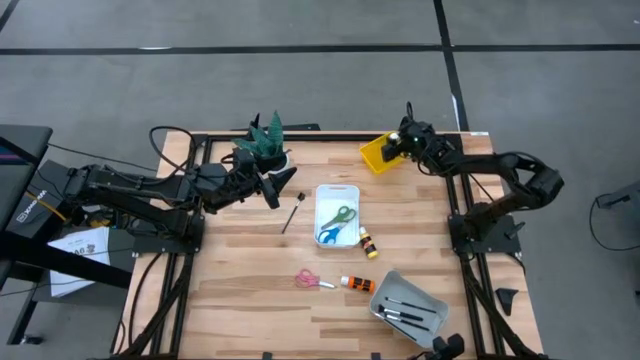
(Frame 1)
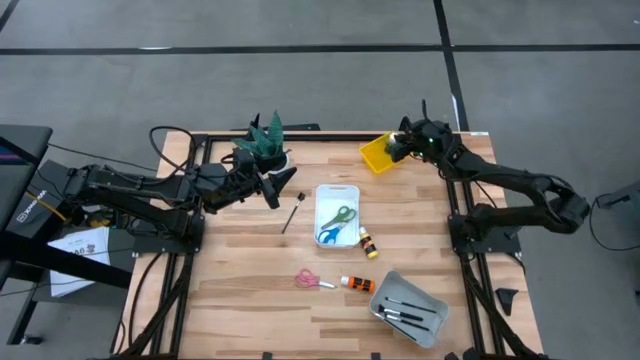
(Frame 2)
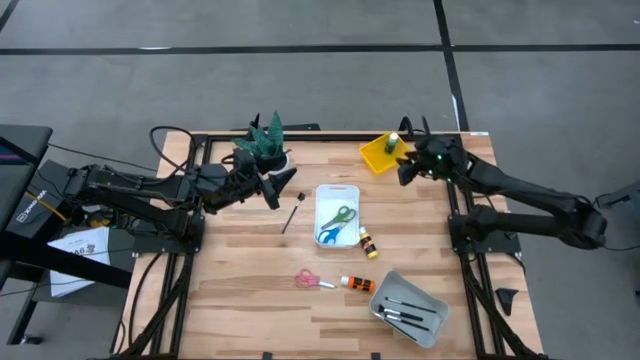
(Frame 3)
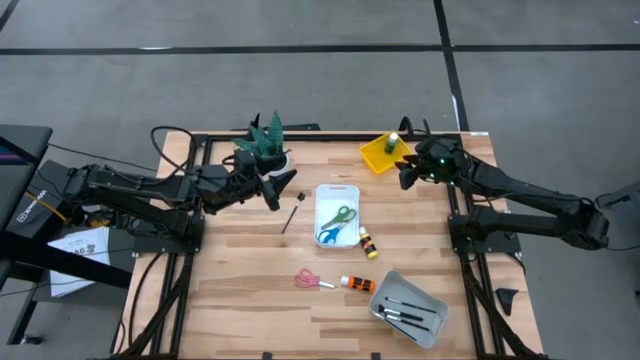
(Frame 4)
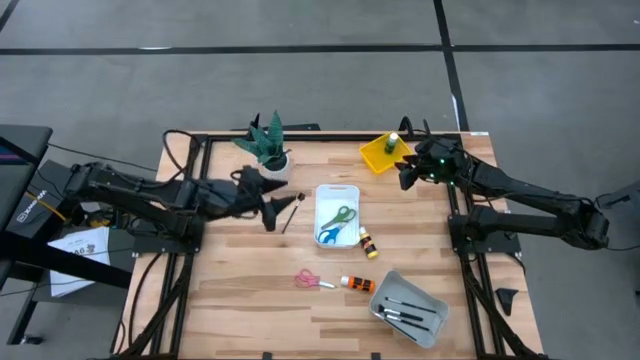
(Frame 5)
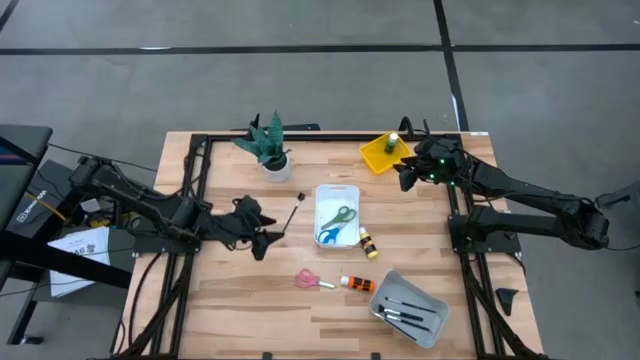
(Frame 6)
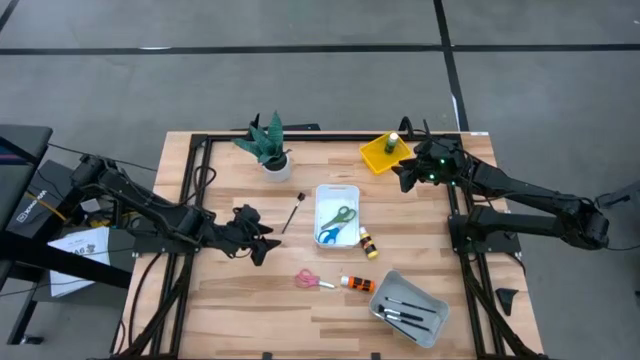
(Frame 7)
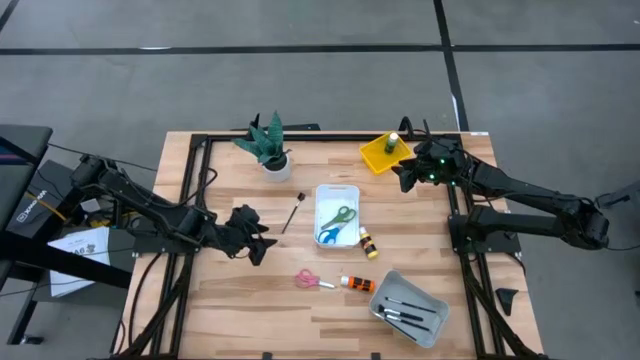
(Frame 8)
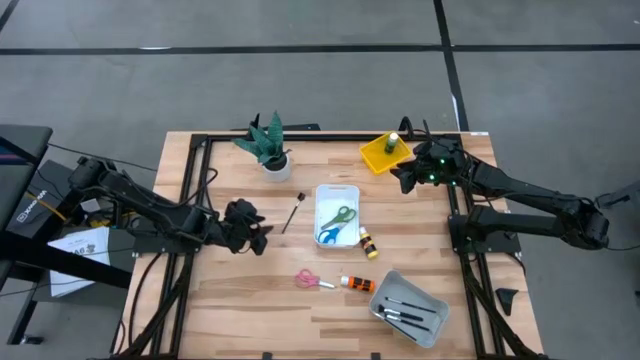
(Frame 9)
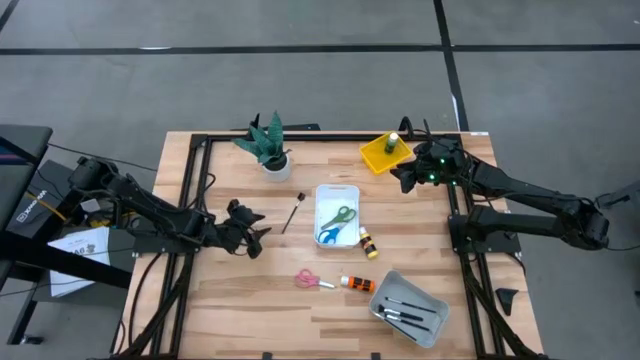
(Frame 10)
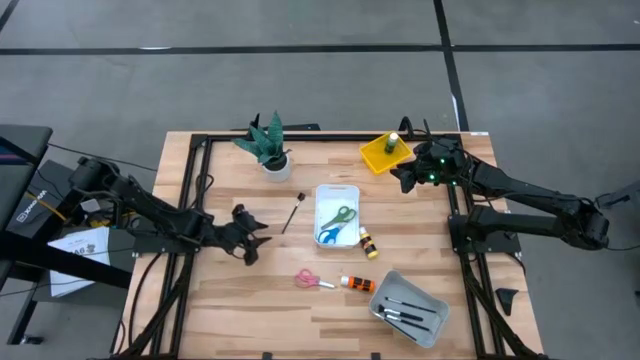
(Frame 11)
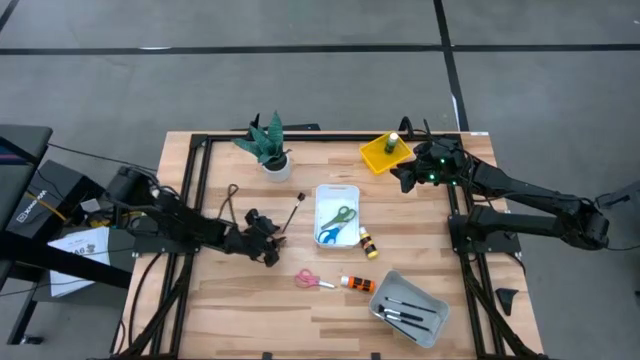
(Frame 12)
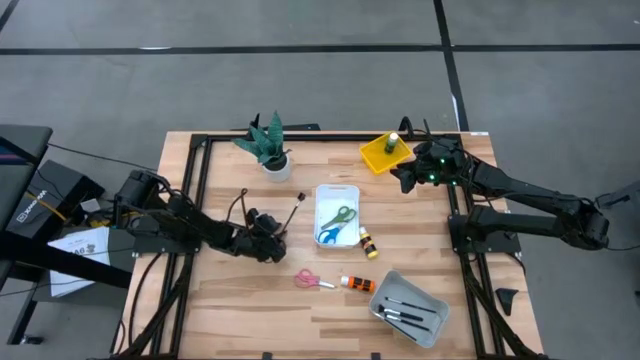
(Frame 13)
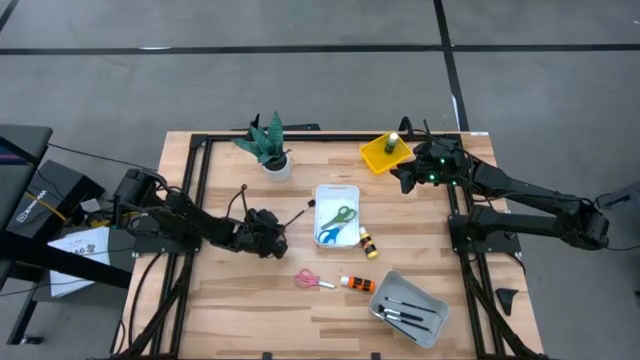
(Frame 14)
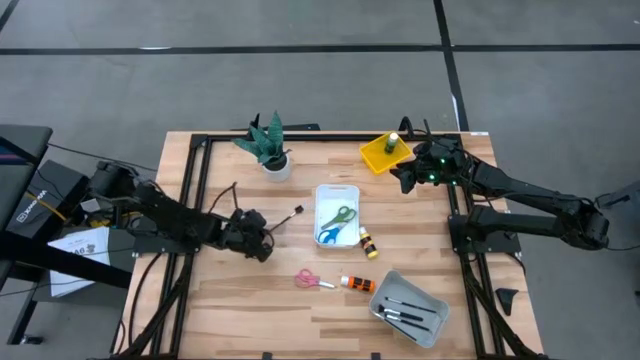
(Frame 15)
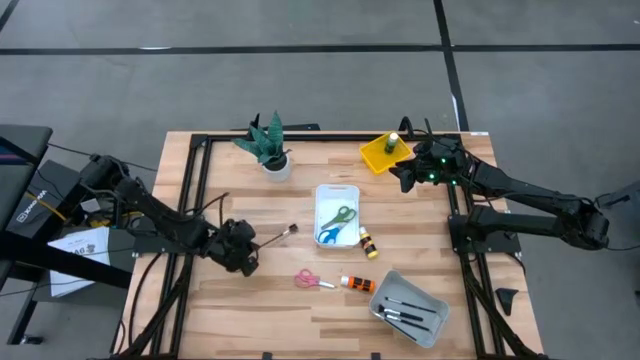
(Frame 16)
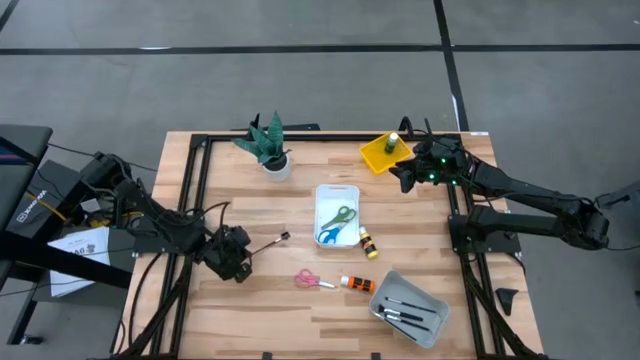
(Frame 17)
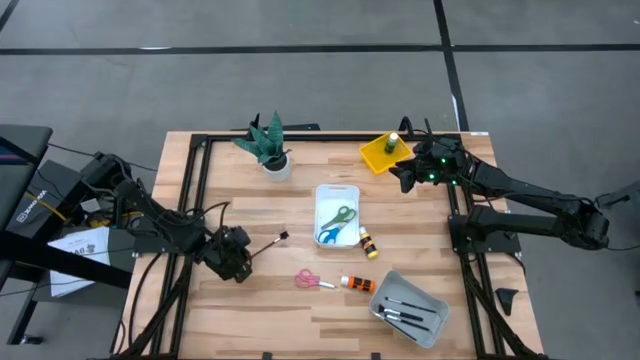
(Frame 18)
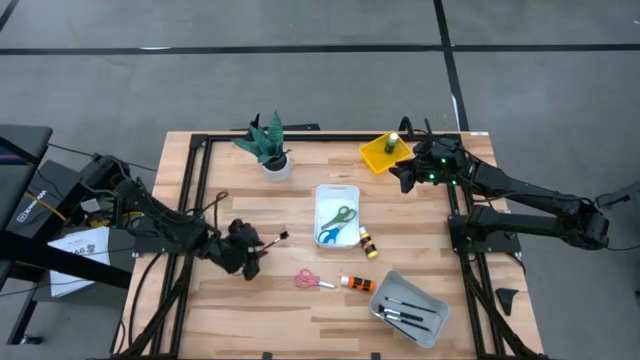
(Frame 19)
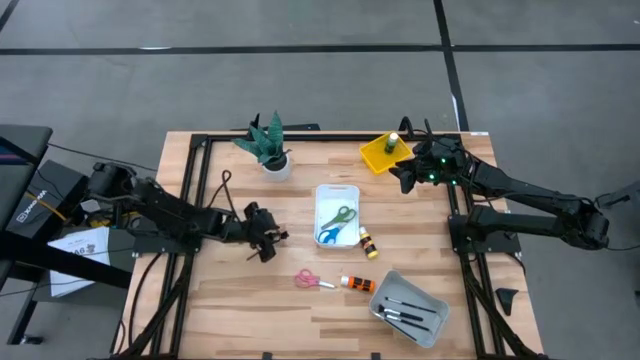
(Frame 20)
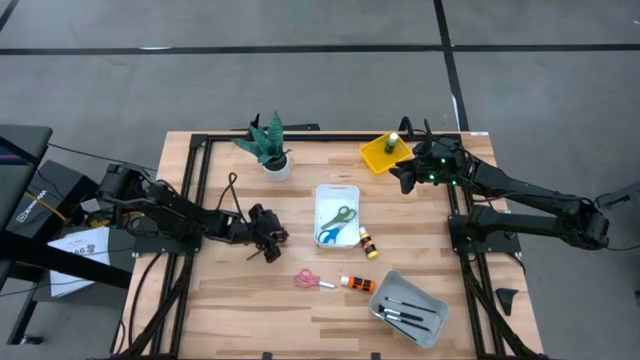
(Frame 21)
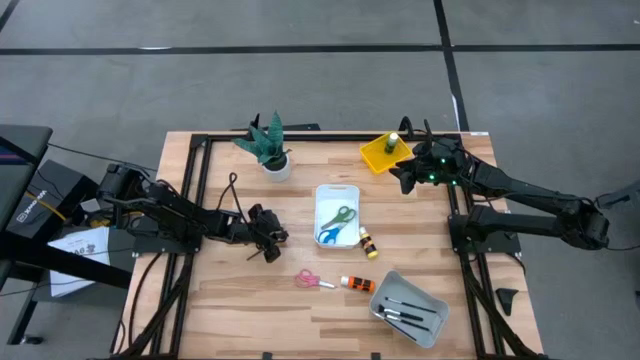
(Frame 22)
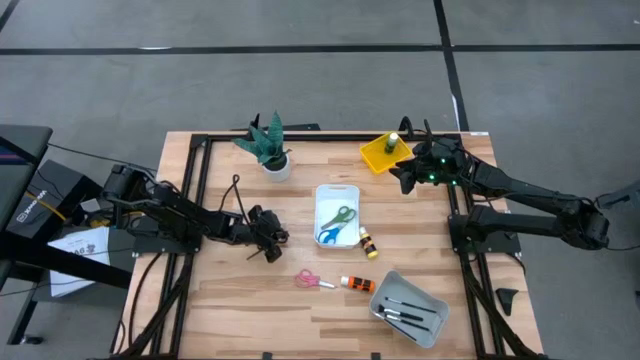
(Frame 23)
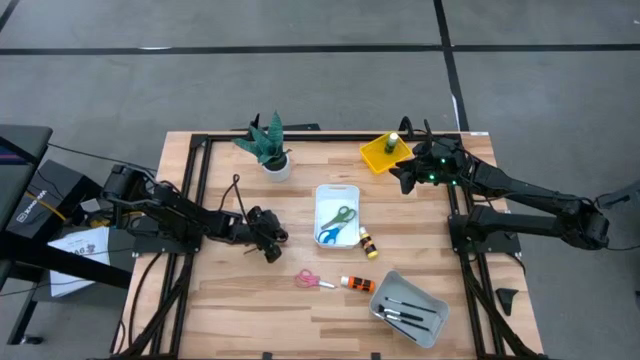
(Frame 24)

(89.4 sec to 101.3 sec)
Task: Pick & Place Paint Supplies
Put the eyebrow brush into the gray bin

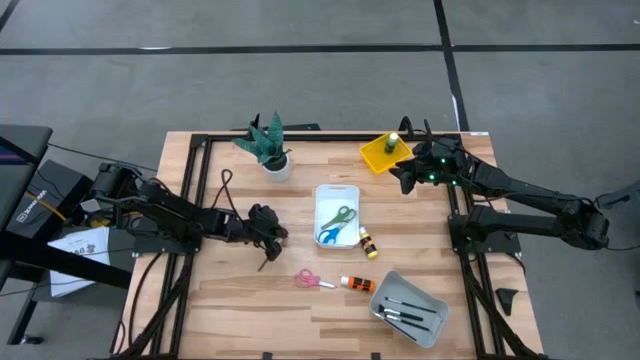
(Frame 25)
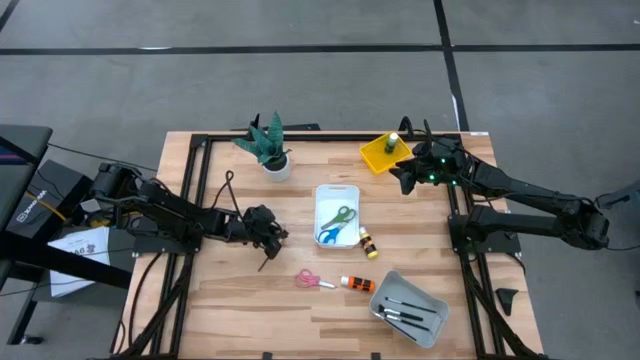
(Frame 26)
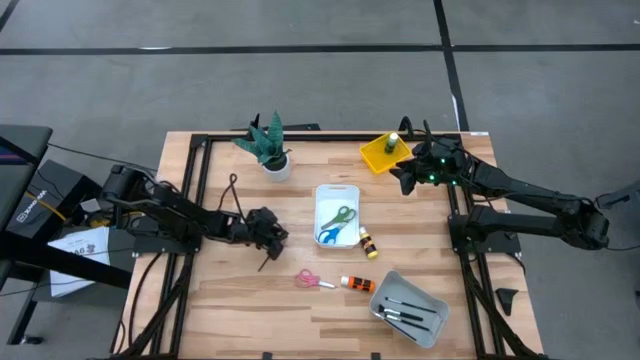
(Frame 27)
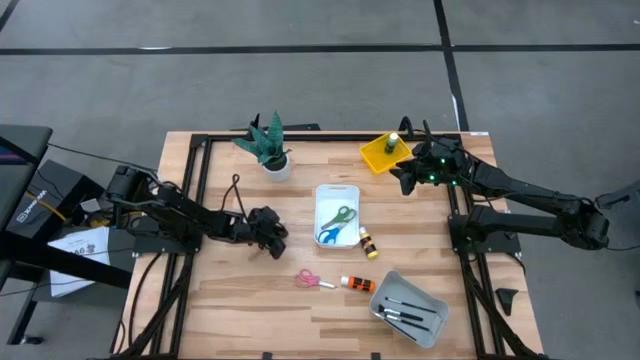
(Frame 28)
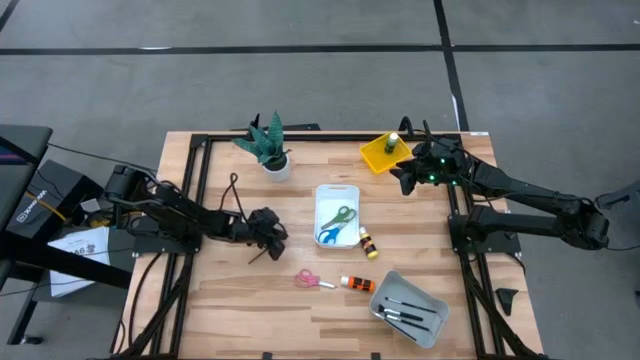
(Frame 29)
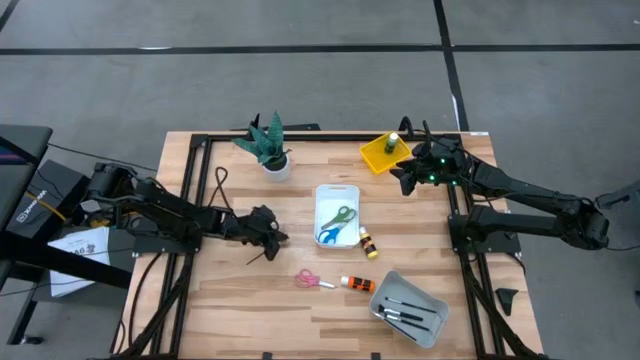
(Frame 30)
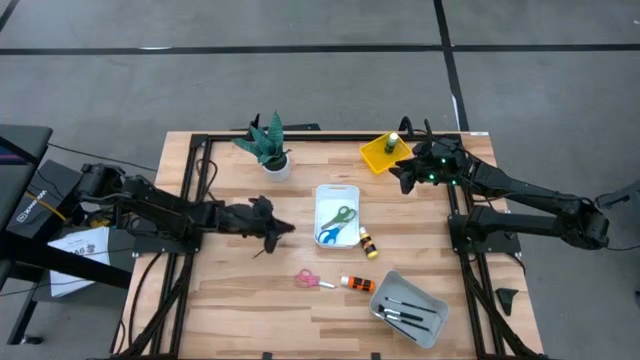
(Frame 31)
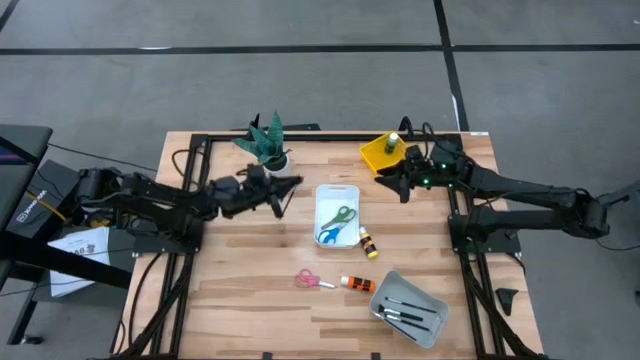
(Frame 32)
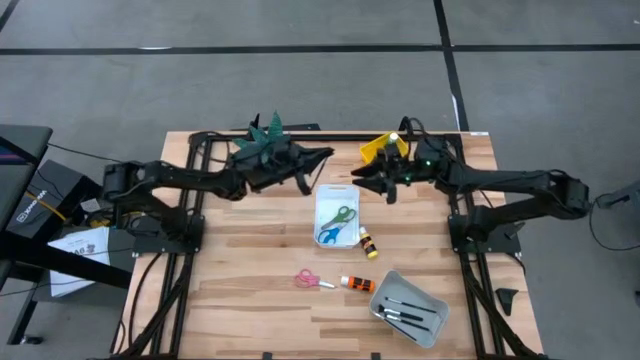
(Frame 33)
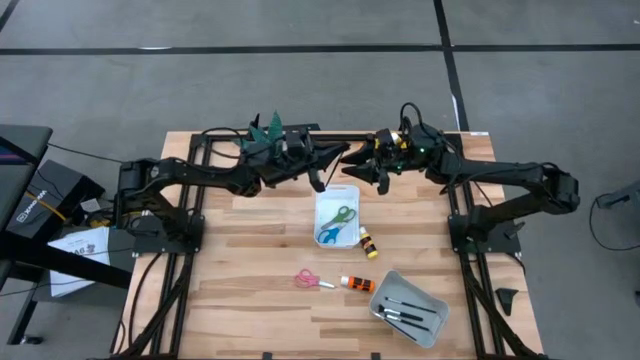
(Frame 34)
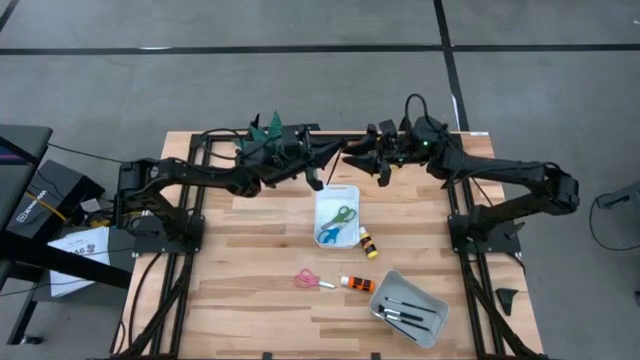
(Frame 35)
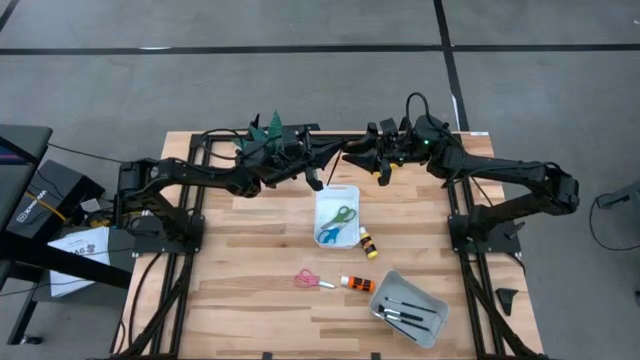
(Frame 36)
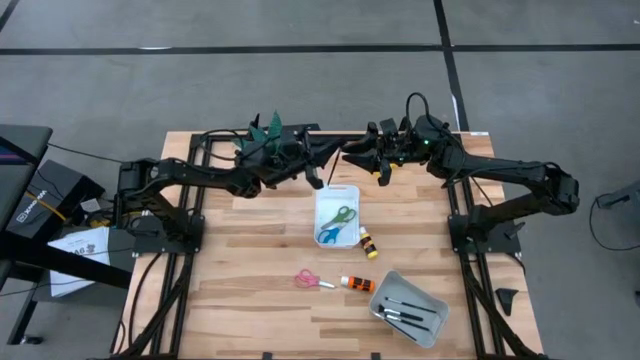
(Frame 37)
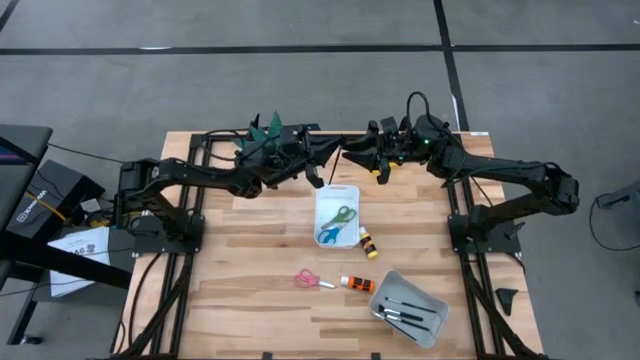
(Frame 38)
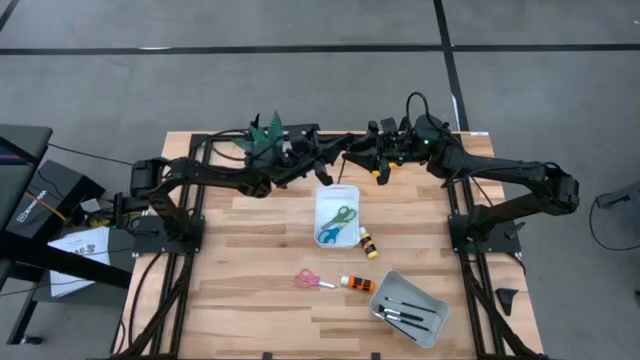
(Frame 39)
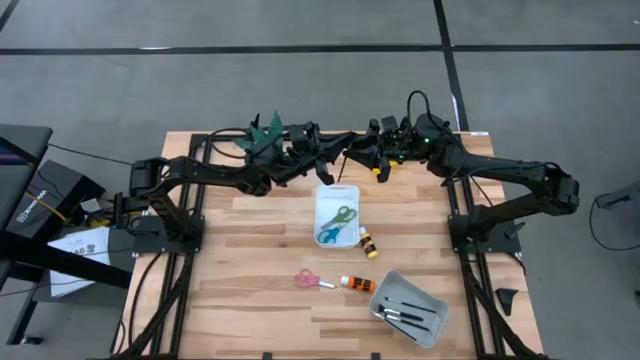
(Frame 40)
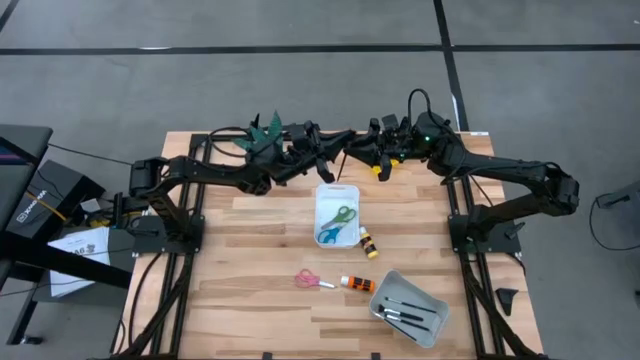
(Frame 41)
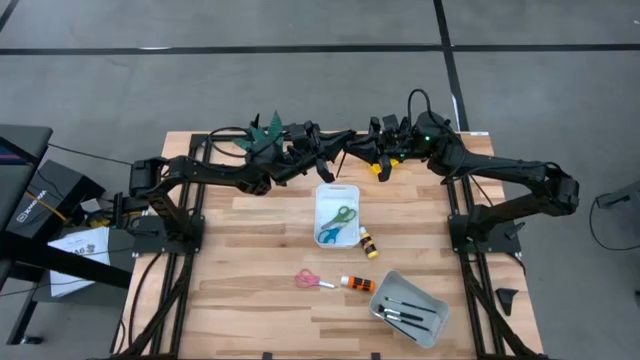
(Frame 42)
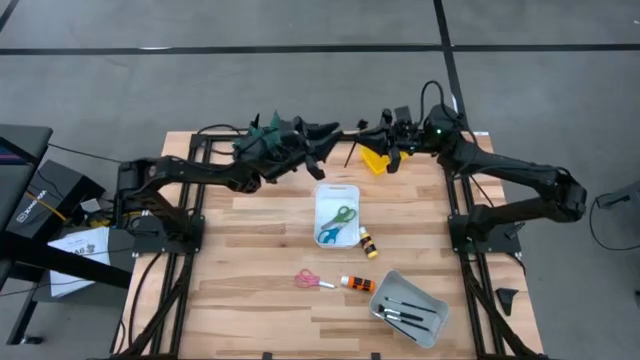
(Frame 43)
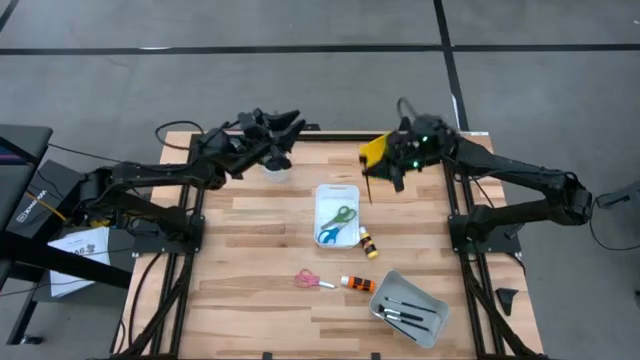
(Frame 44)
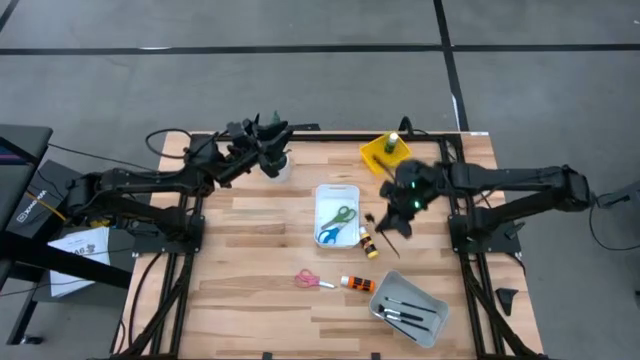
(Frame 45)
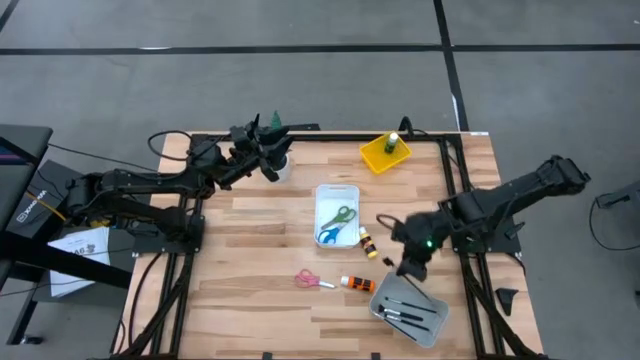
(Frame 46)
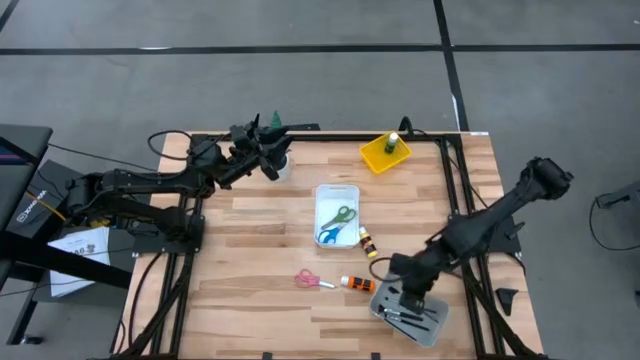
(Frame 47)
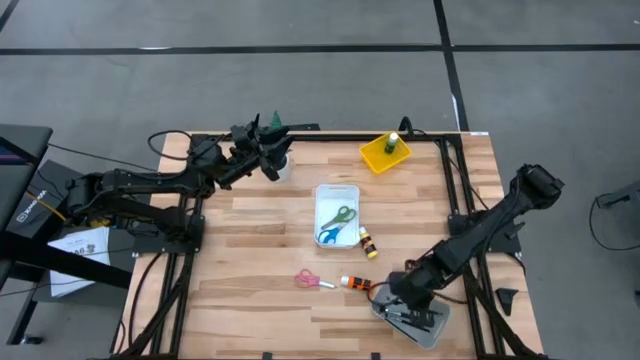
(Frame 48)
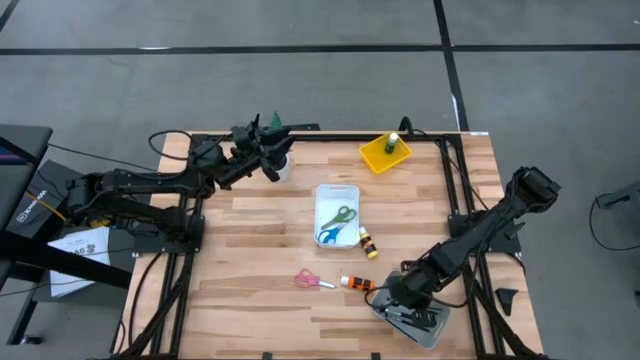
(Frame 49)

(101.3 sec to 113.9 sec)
Put the eyebrow brush into the gray bin
